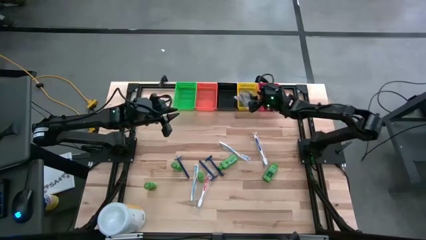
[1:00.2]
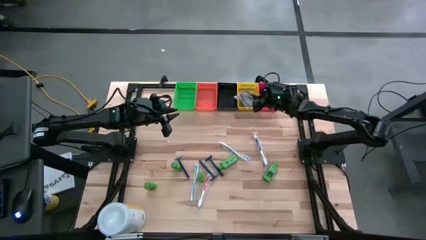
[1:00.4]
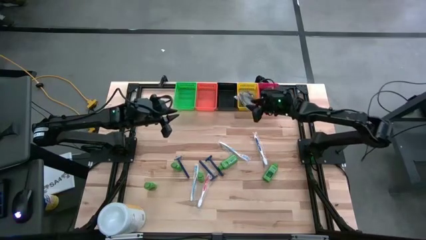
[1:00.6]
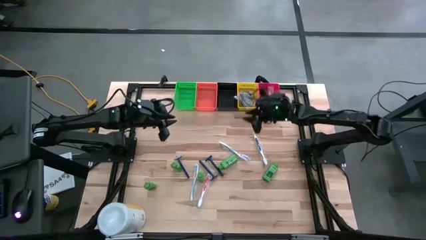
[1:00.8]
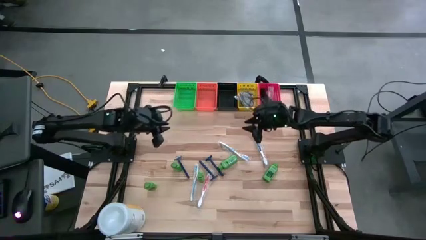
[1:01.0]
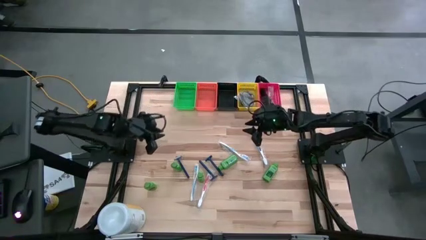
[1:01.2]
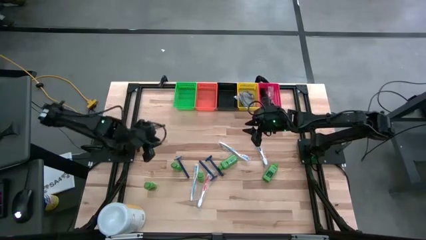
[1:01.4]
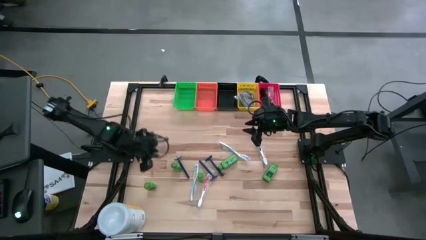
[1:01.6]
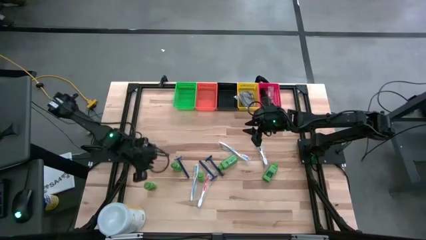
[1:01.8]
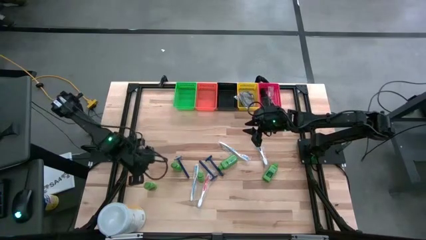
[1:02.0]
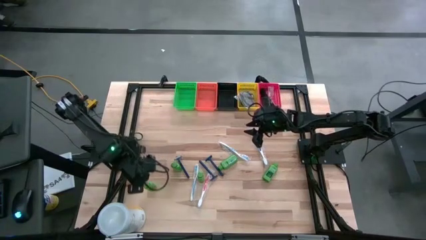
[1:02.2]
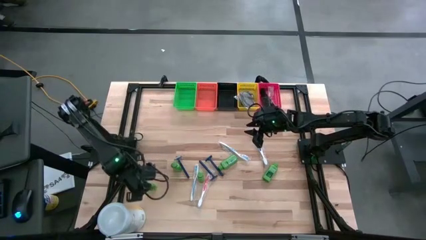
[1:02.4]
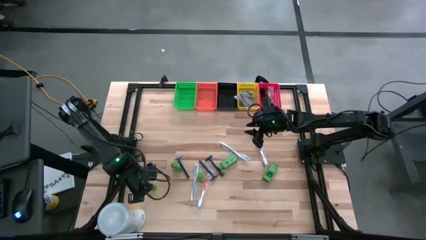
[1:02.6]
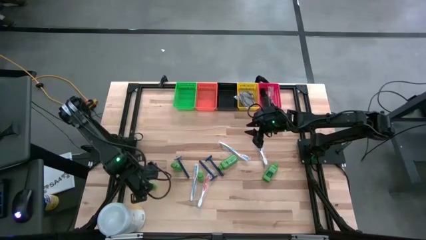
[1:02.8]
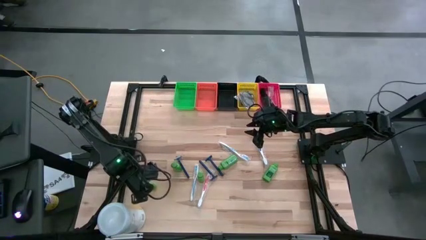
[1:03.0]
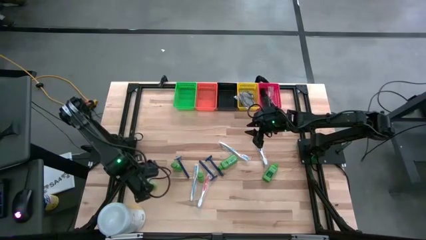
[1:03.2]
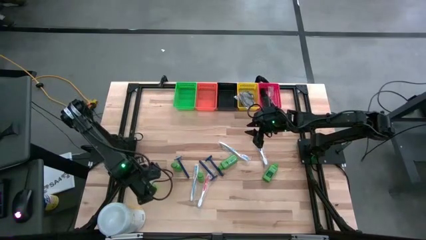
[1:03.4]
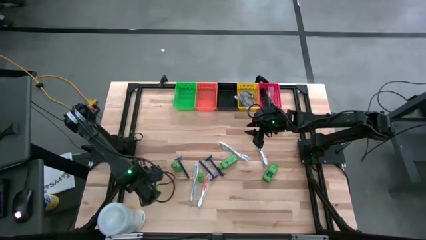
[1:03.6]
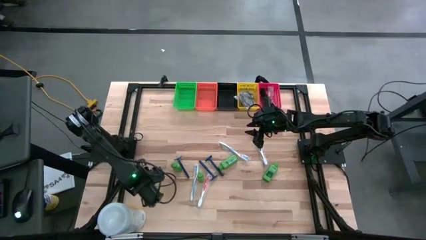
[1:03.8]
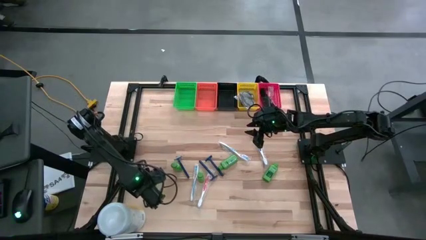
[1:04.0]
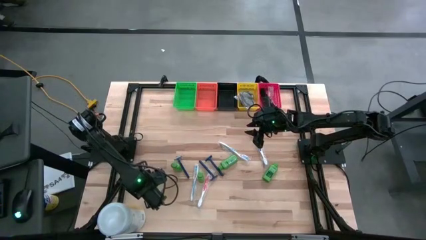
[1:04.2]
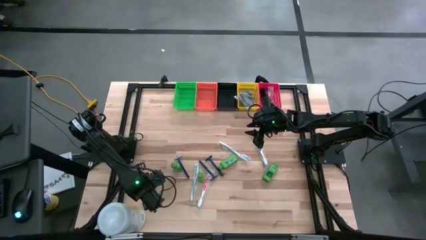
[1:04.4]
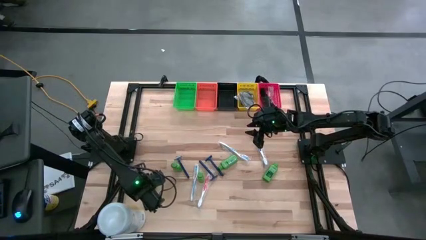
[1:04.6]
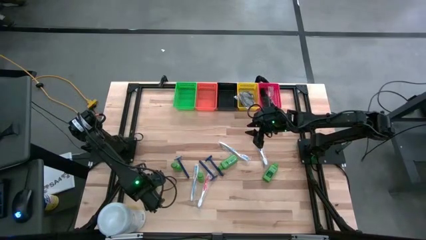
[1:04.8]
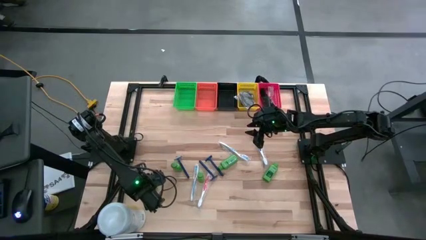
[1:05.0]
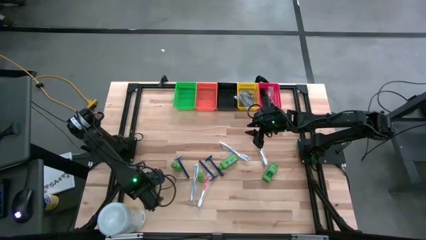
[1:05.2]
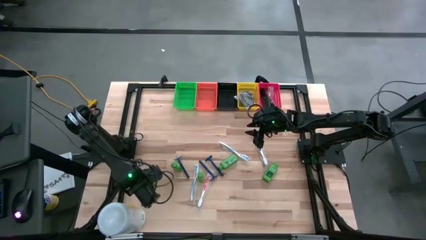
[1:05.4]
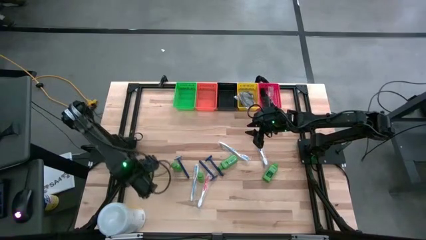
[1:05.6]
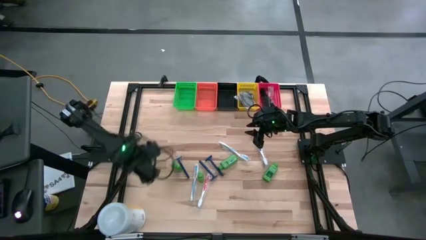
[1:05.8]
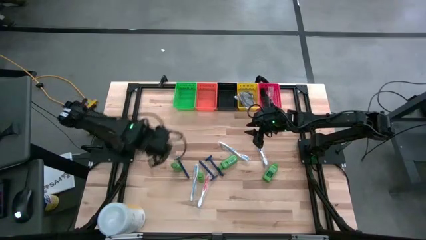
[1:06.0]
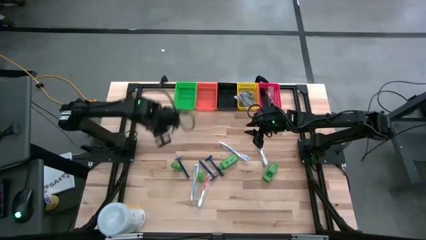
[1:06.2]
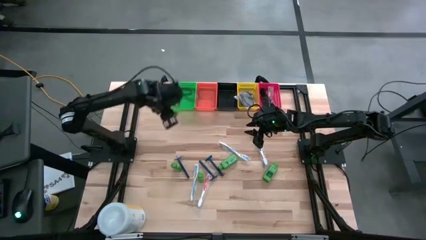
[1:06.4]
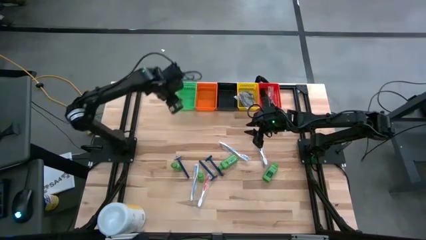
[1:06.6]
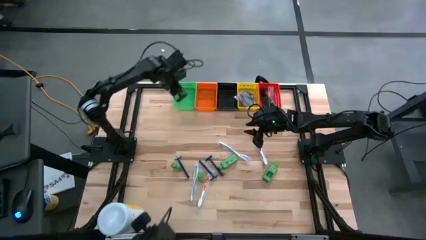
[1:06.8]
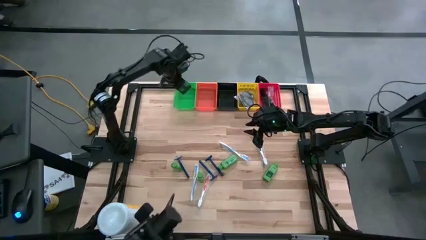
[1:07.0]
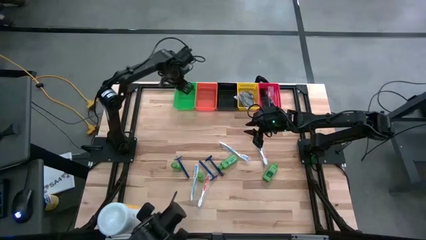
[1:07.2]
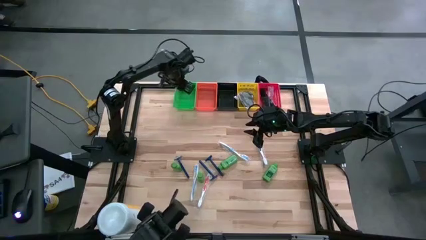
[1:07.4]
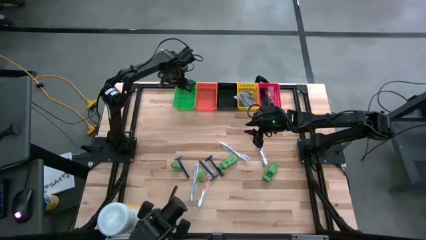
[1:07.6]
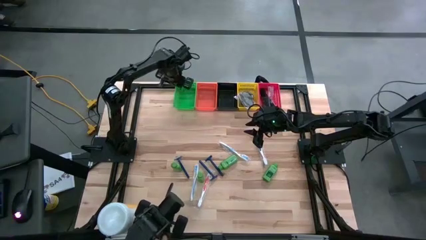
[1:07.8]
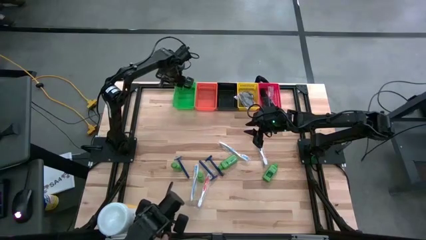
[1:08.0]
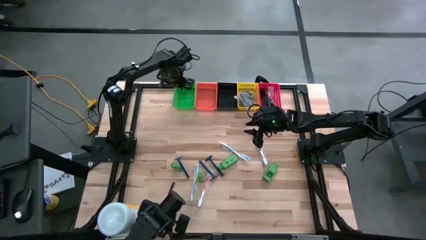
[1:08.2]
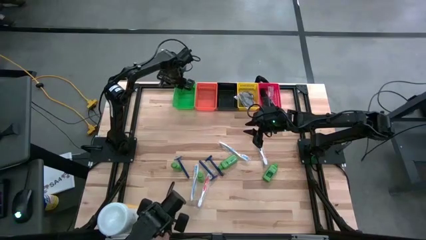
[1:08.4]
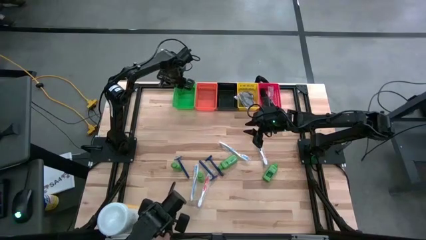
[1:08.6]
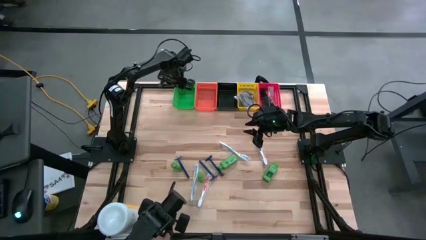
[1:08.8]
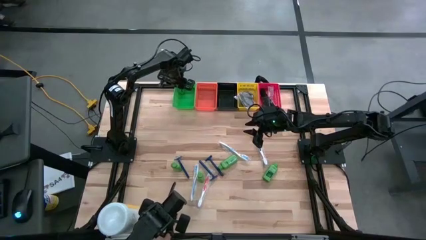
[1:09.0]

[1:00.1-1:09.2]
Task: Pick & Place Travel size toiletries
Put the green shampoo bottle into the green bin

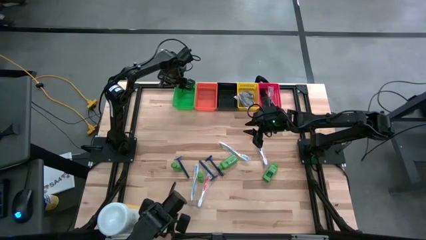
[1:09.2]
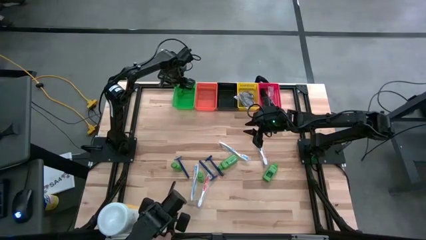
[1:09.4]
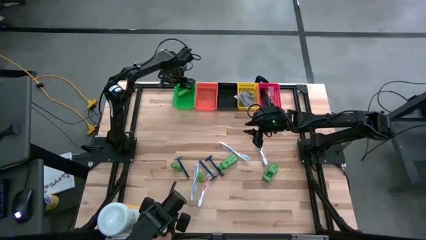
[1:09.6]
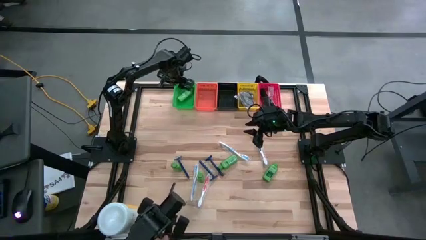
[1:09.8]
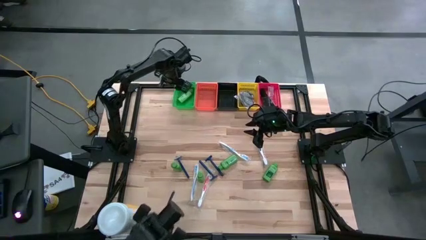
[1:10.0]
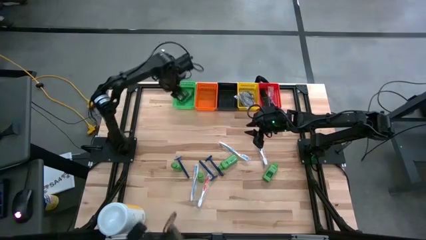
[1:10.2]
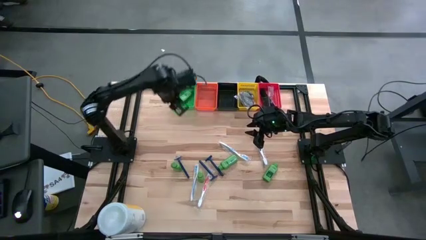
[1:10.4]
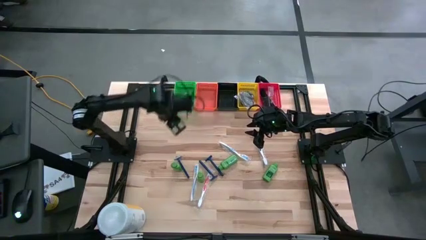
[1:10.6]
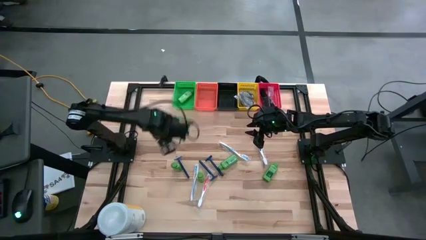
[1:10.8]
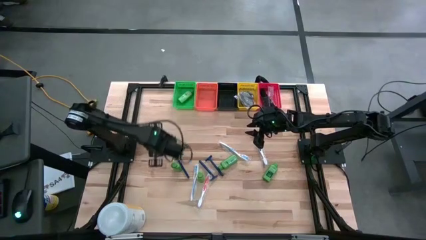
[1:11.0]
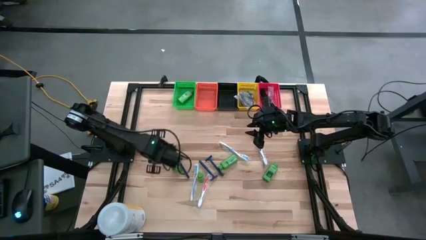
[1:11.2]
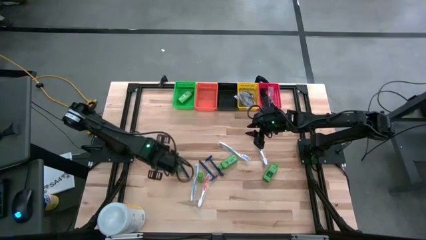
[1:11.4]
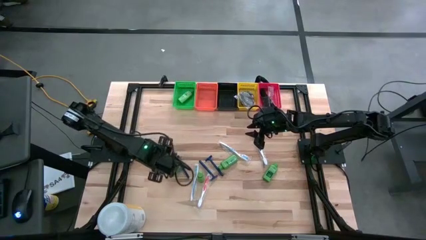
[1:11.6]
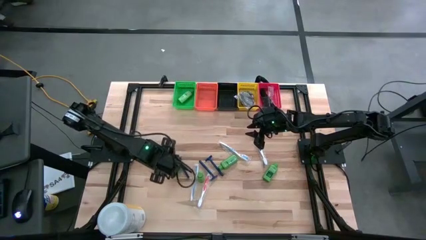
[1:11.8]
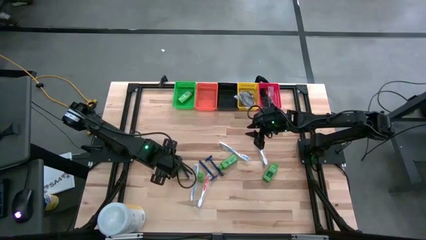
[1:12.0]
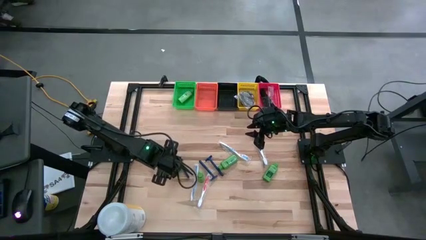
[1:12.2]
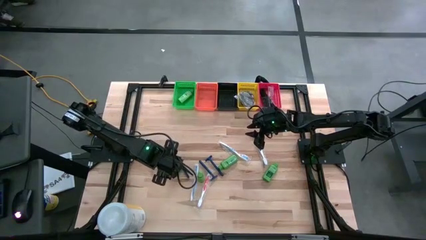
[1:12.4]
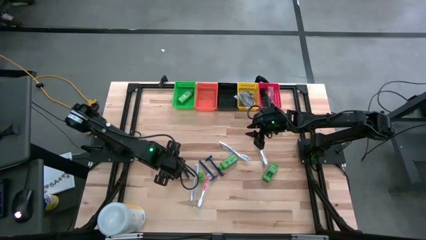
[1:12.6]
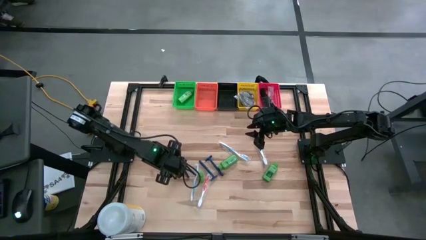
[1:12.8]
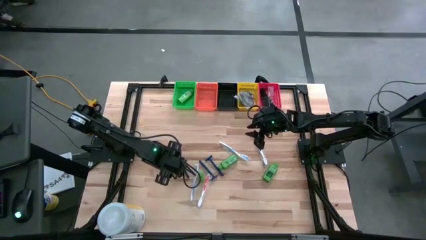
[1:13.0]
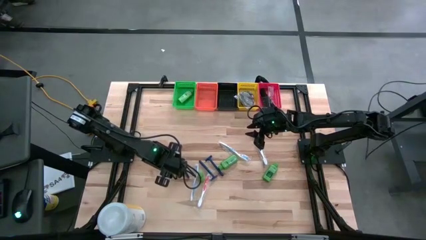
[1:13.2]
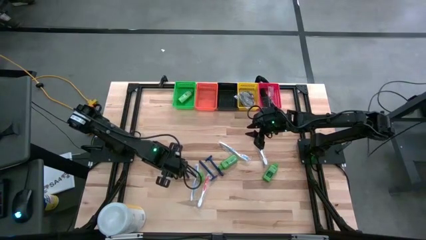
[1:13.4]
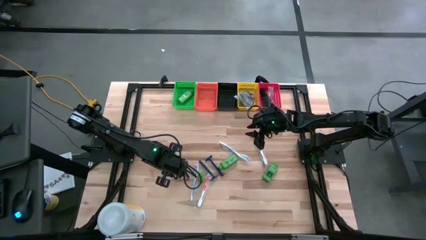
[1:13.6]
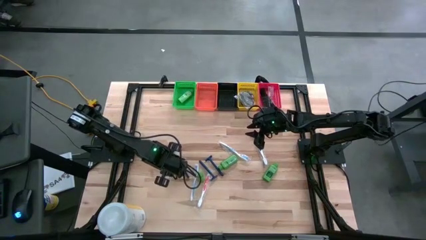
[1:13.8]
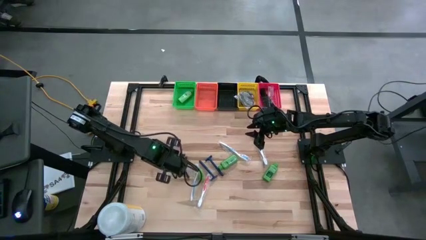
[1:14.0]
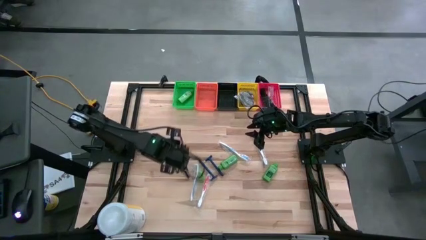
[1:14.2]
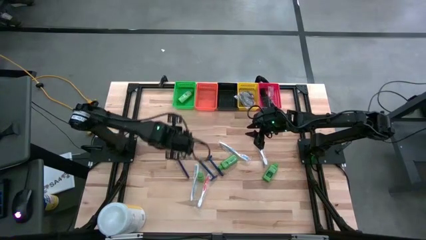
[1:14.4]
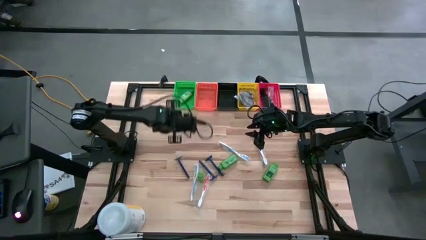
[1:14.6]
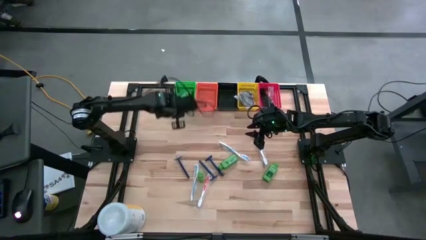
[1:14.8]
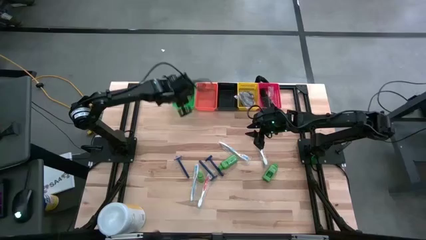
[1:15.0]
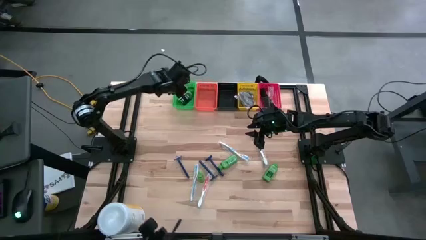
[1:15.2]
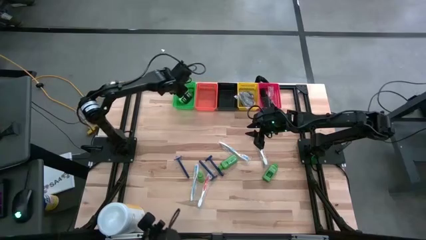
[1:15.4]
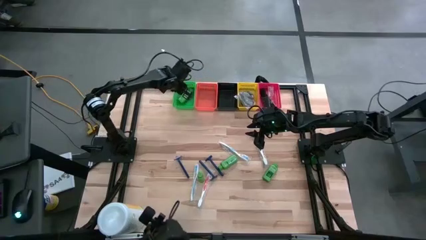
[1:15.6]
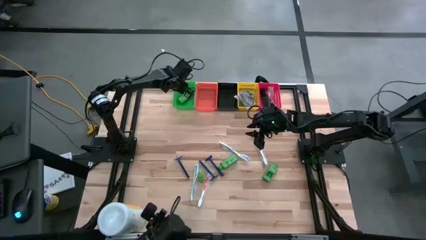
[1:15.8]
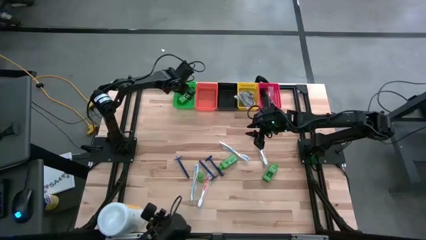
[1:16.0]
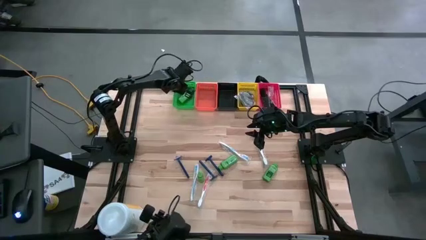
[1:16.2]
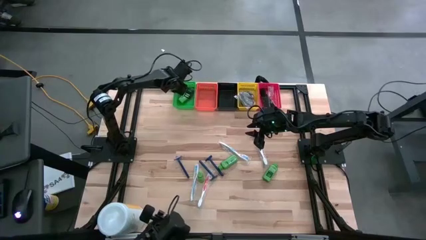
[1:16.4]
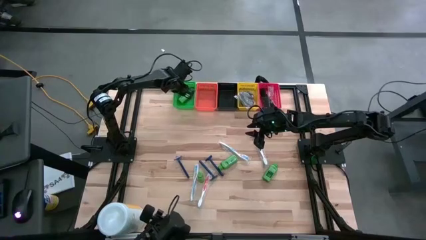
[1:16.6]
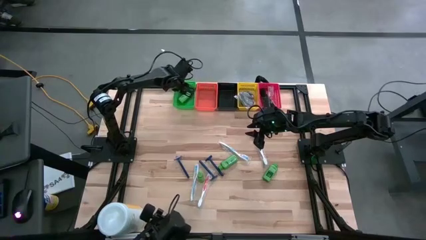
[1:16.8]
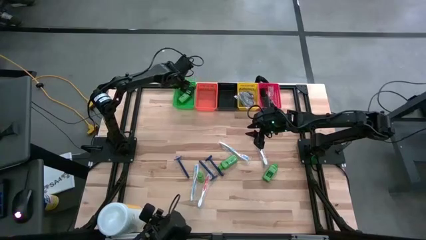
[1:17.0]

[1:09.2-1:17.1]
Put the green shampoo bottle into the green bin
